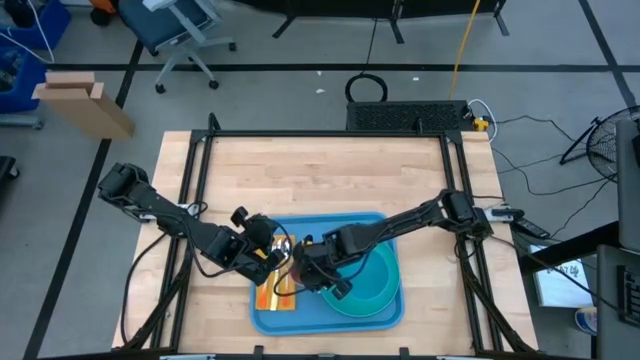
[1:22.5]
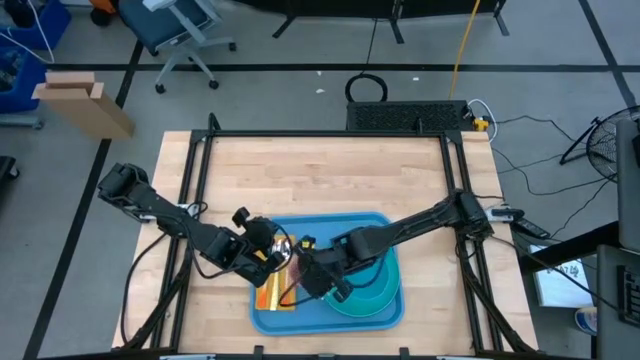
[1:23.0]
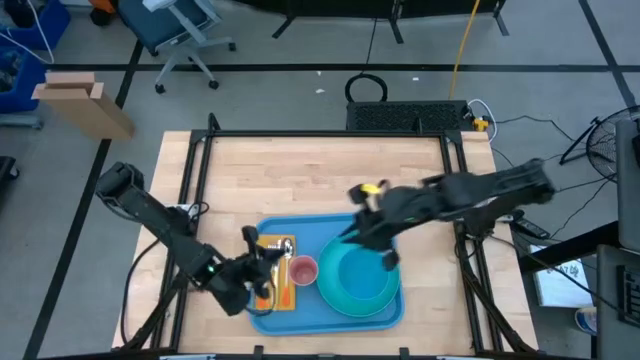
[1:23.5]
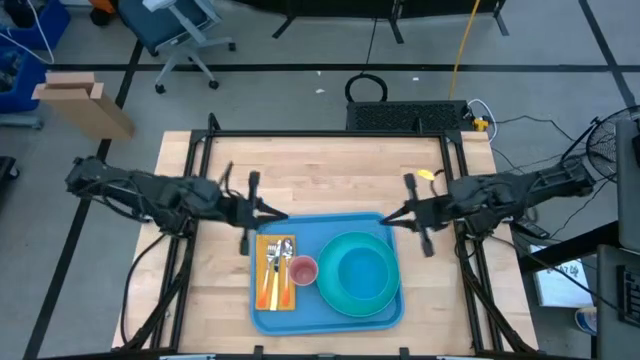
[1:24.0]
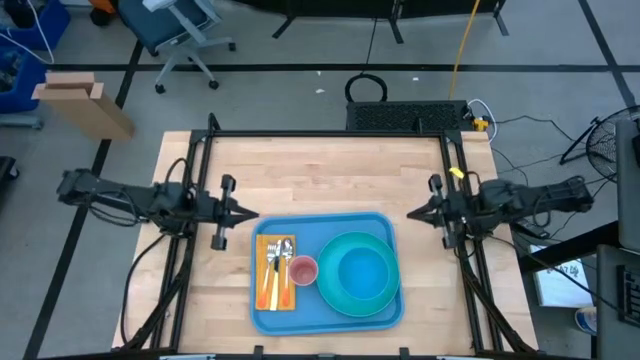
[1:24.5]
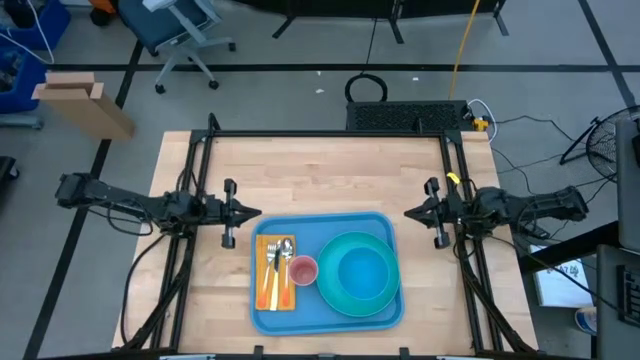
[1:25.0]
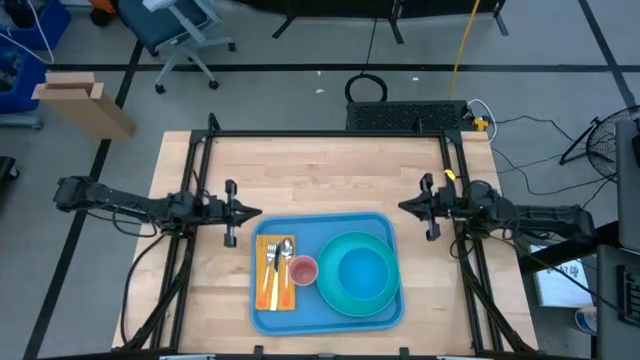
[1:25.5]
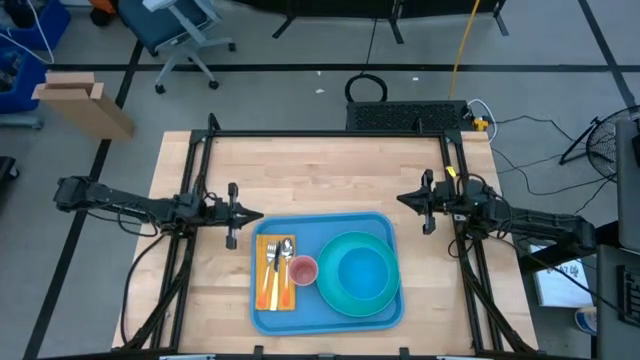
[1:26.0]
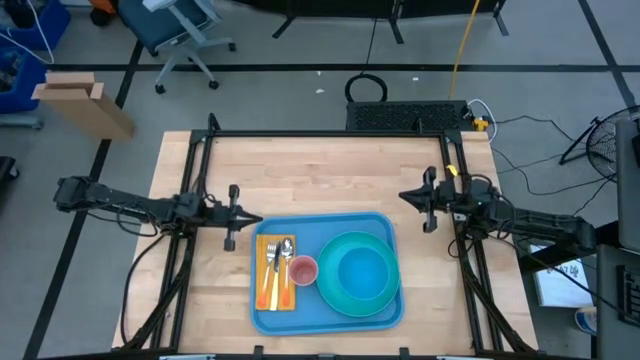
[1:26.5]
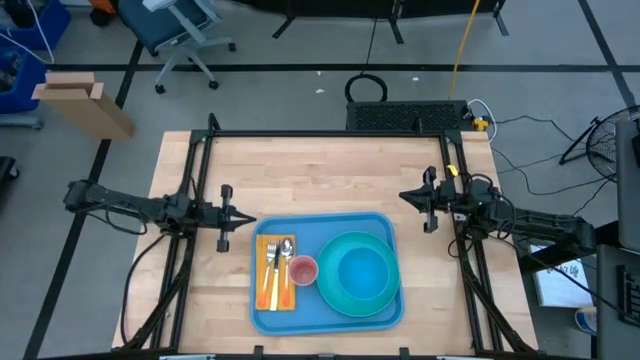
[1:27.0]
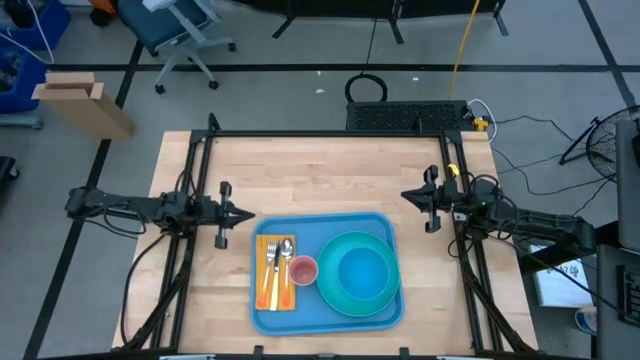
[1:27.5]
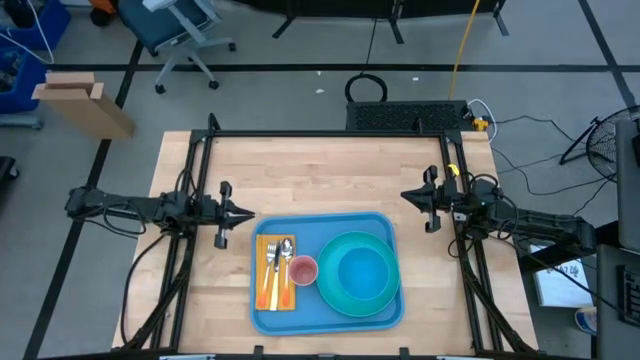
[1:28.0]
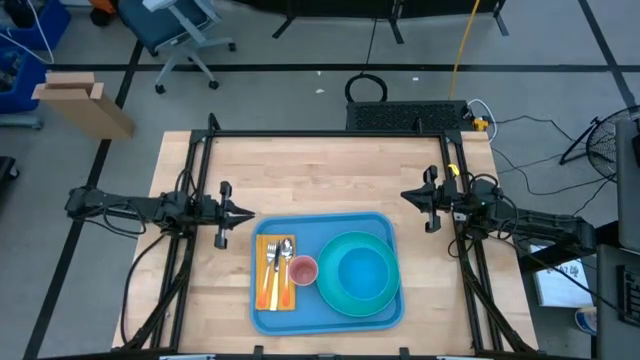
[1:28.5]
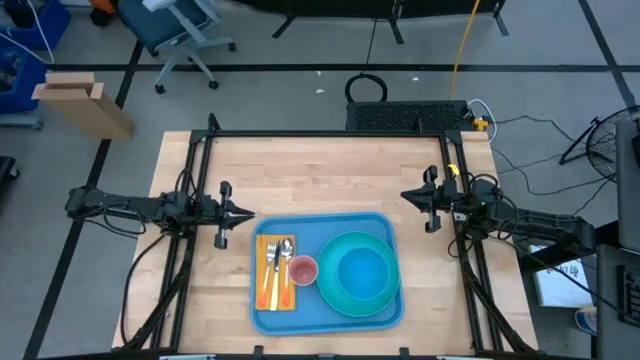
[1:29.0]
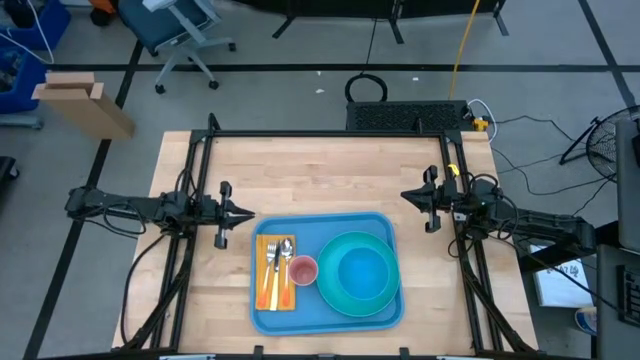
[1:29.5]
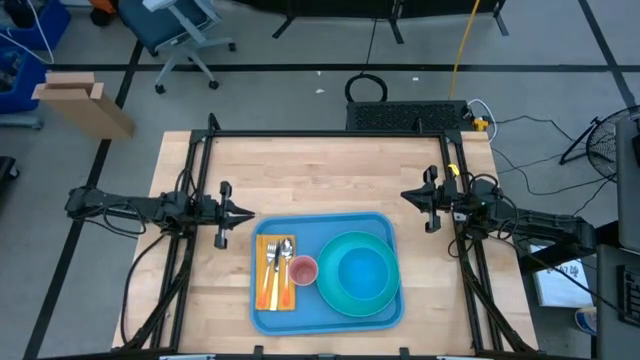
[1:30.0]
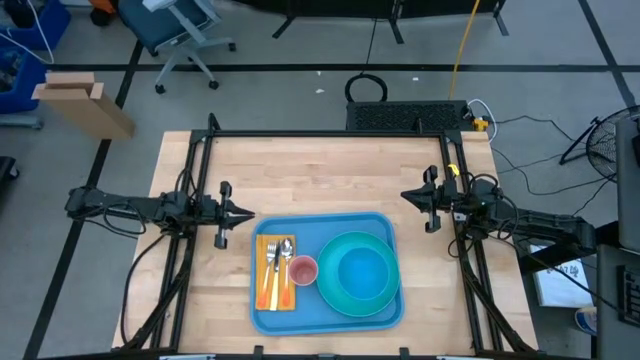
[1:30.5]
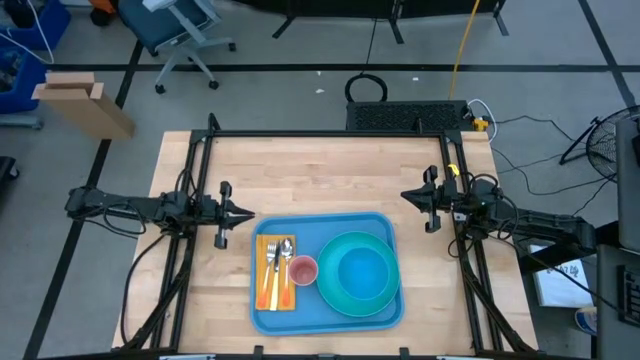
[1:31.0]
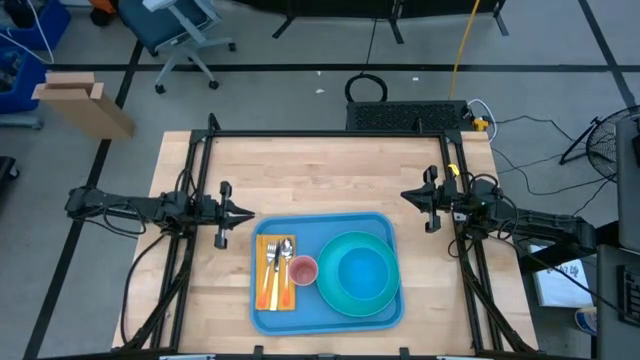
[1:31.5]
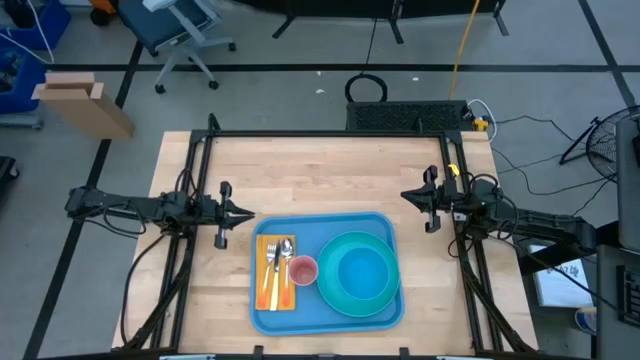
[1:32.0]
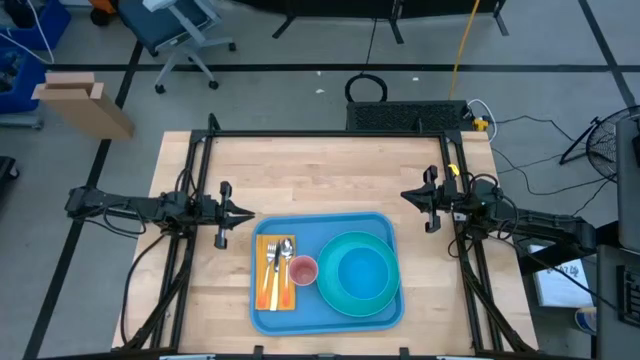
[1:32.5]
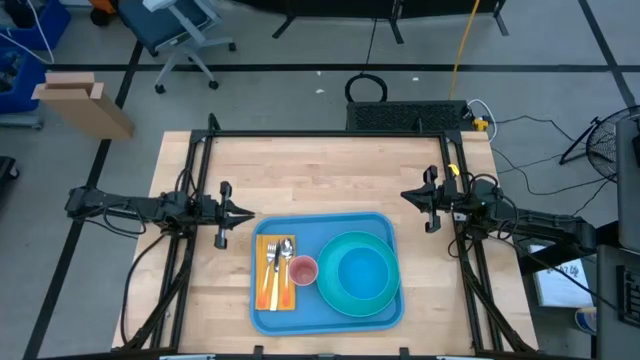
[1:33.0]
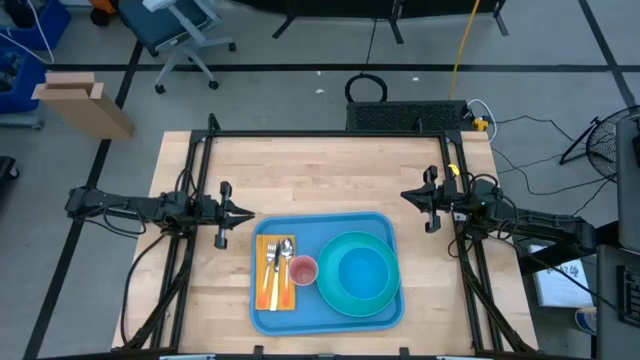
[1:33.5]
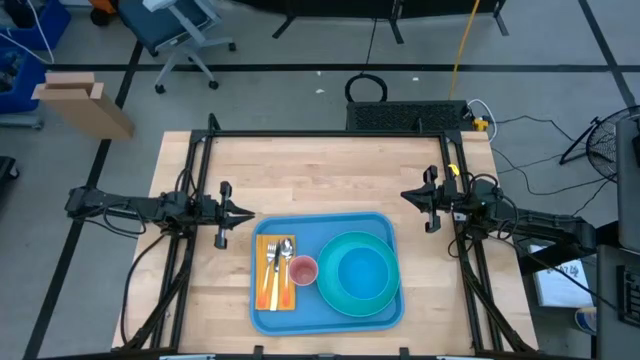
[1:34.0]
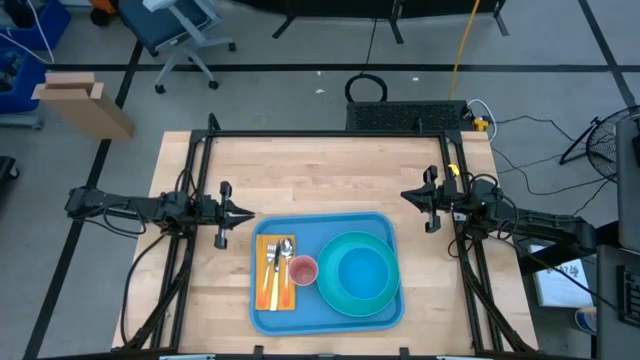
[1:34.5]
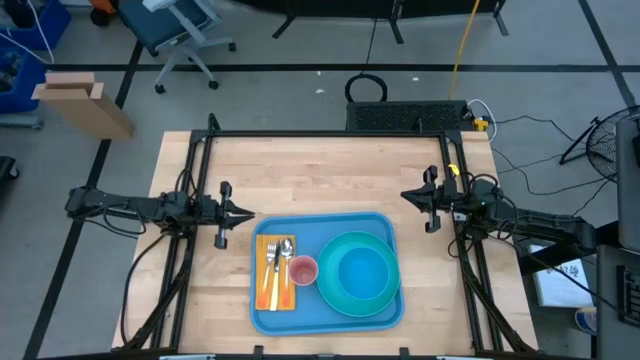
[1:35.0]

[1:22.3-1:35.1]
Task: Set up tray
Return to Home Position

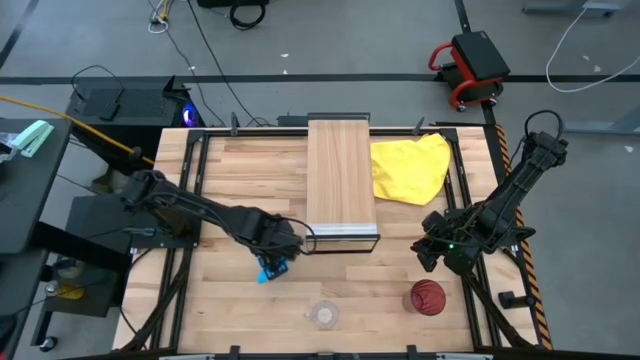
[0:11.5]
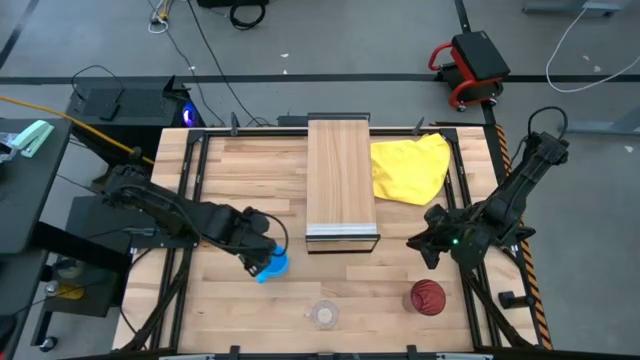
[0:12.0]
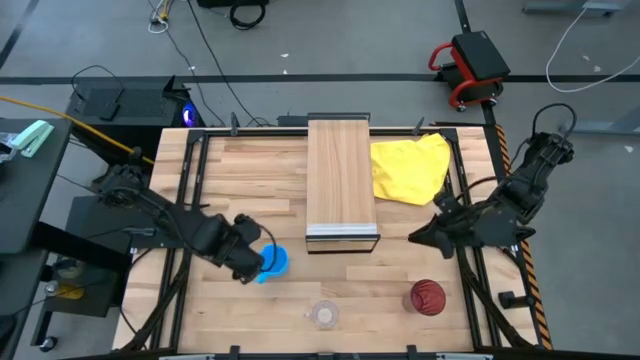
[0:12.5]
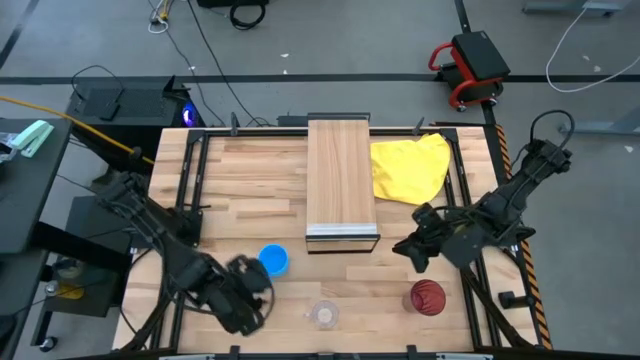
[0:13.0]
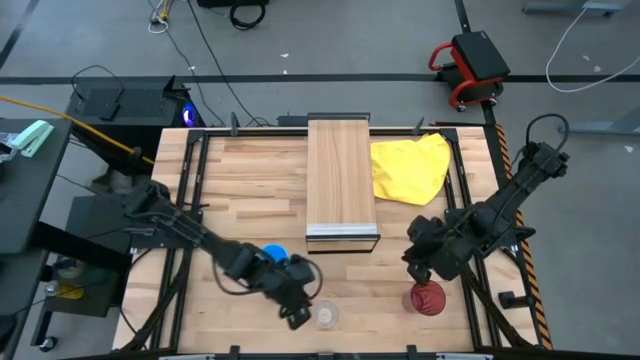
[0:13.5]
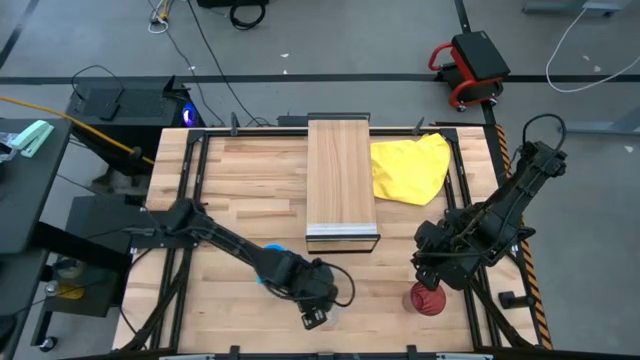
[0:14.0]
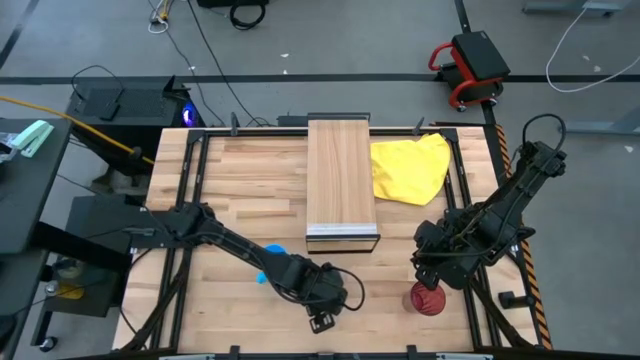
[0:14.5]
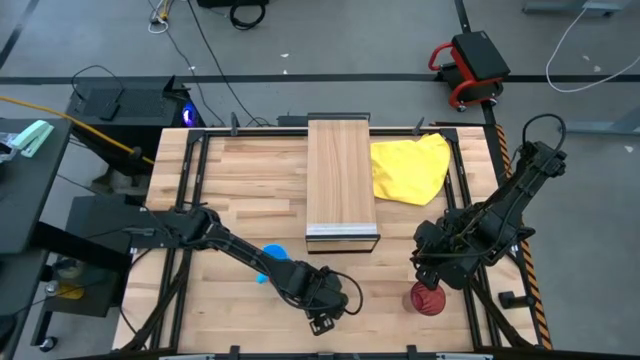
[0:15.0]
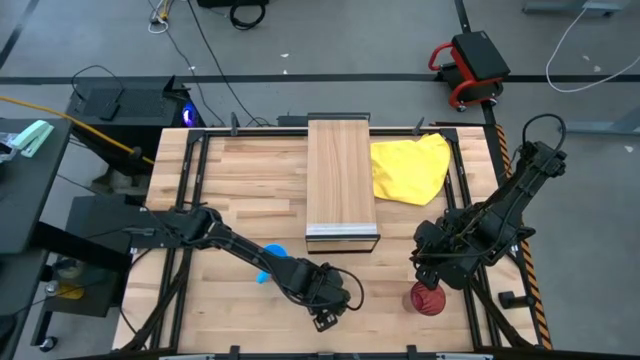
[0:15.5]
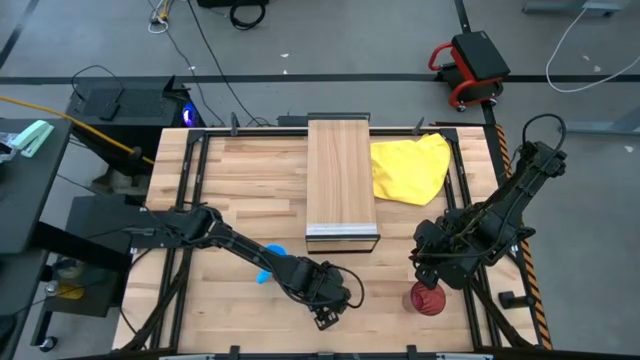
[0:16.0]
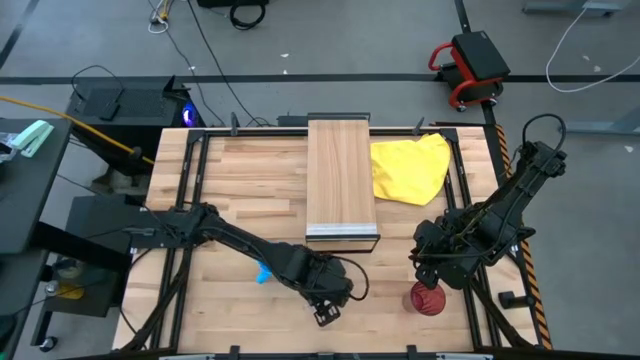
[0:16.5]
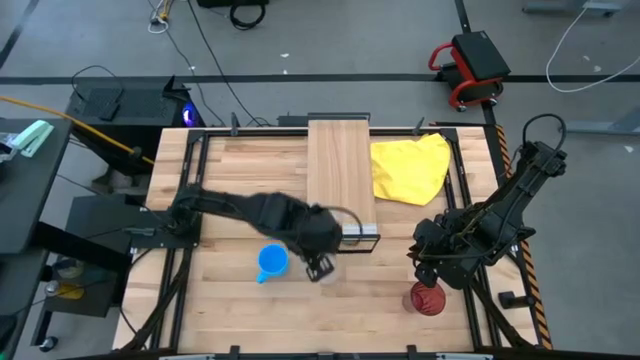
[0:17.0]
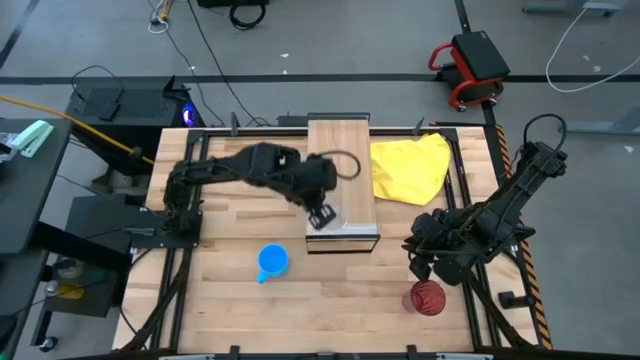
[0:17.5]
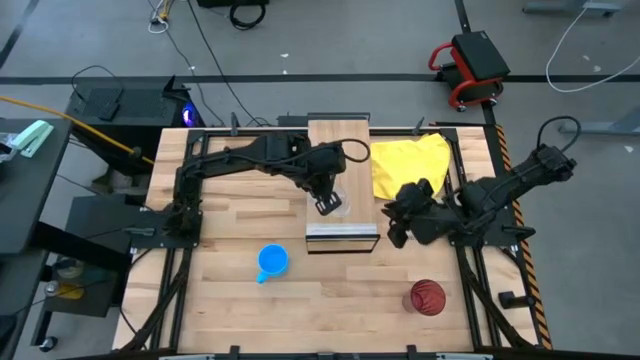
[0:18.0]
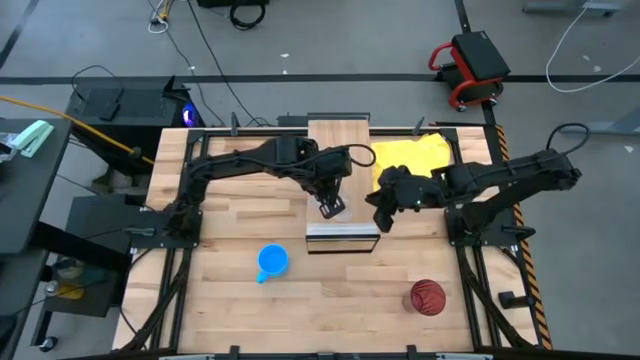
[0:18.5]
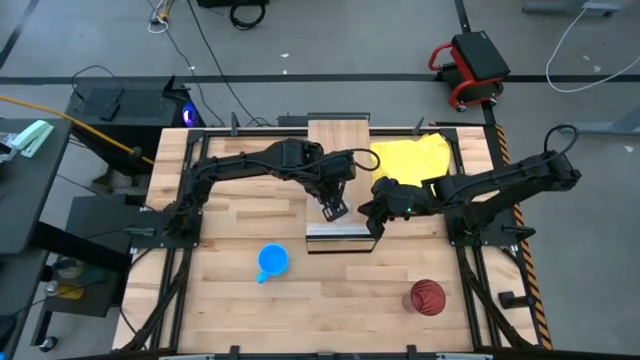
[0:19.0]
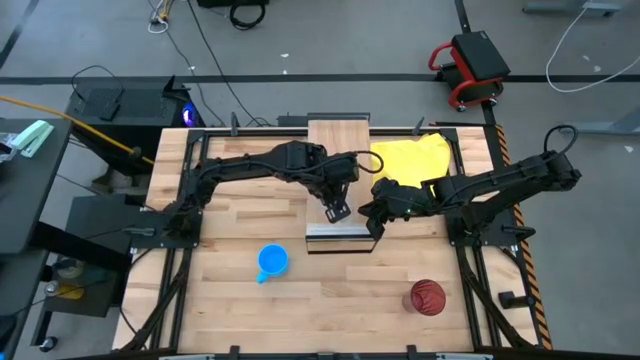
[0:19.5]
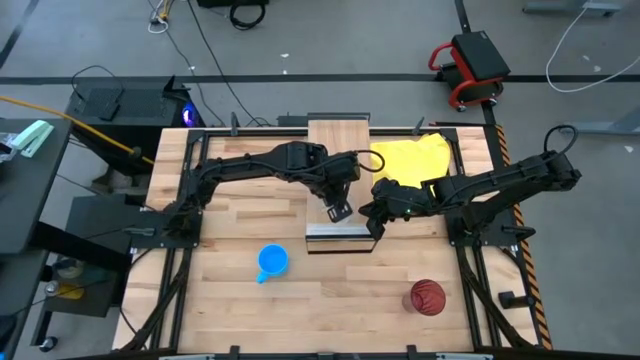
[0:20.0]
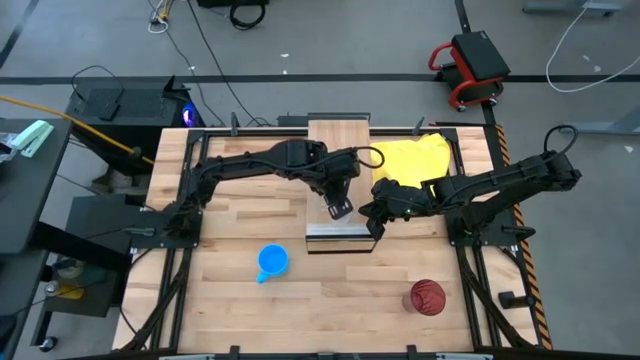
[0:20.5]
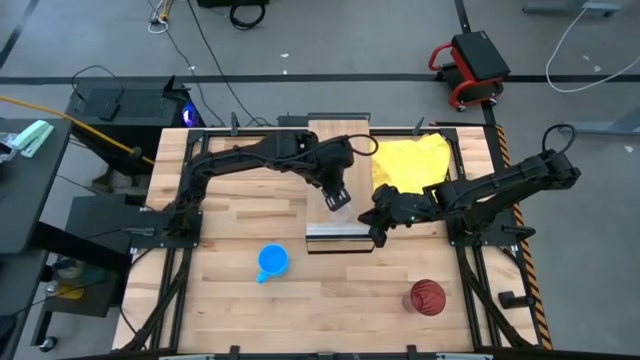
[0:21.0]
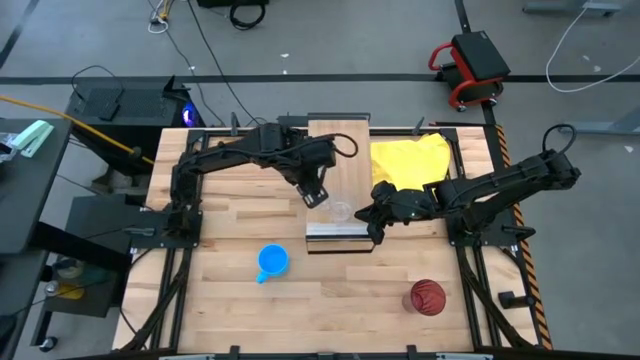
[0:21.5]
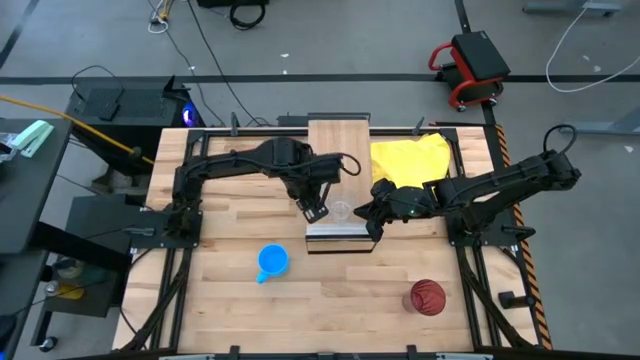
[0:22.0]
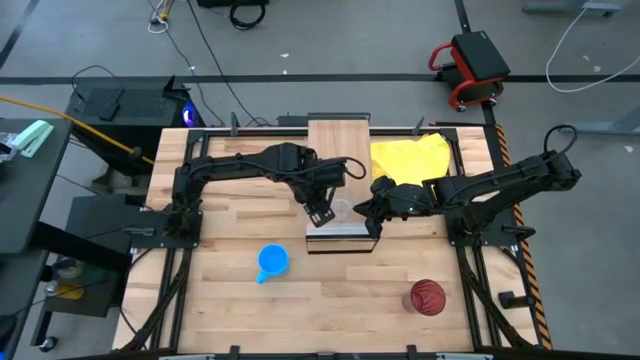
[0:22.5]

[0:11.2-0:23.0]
Task: Stack small to large cups/mugs on shelf
Put the transparent mug on the shelf
